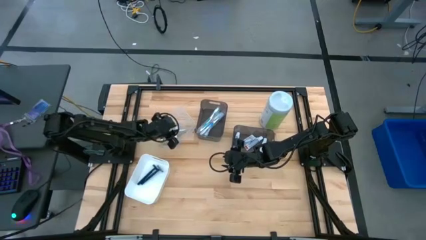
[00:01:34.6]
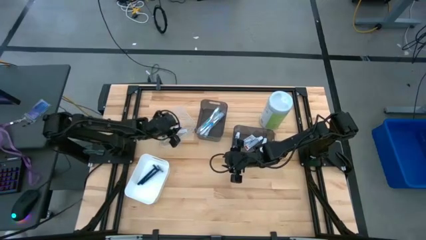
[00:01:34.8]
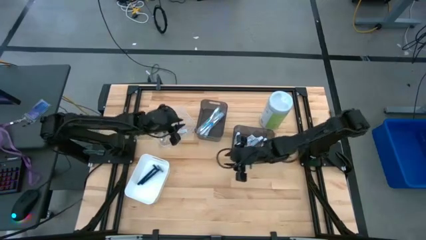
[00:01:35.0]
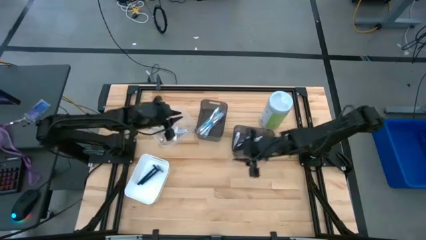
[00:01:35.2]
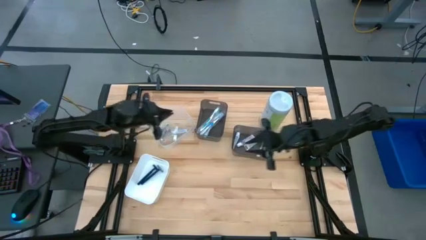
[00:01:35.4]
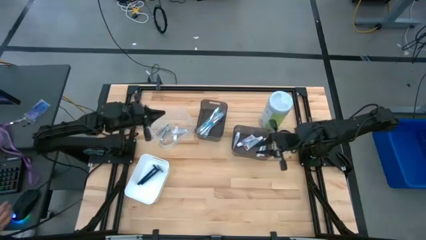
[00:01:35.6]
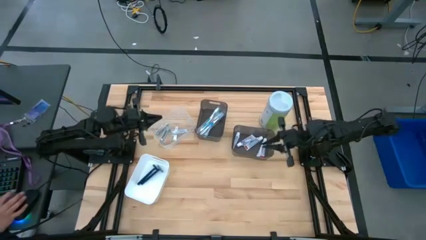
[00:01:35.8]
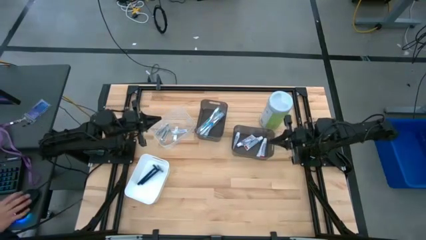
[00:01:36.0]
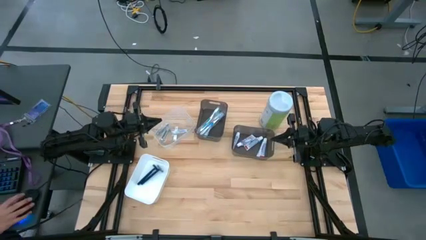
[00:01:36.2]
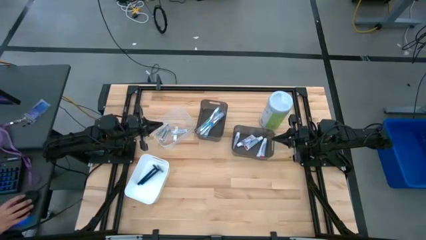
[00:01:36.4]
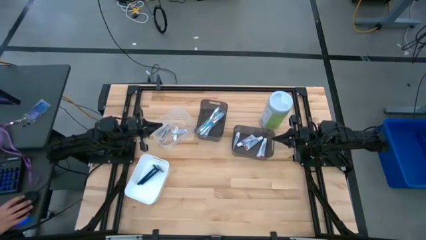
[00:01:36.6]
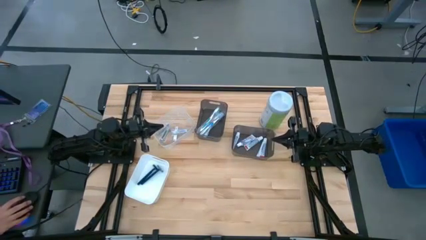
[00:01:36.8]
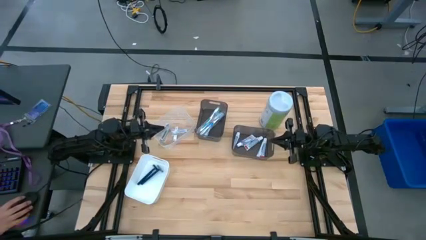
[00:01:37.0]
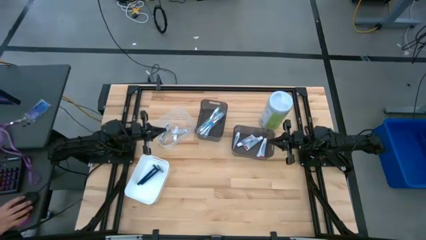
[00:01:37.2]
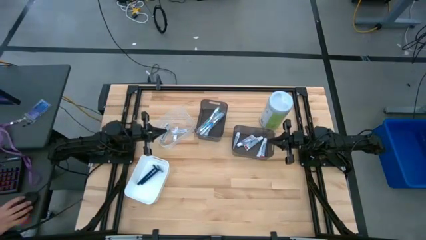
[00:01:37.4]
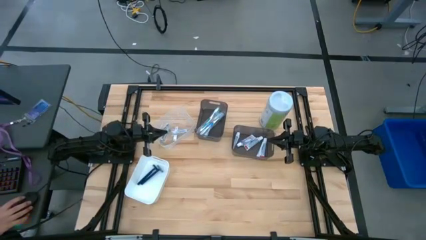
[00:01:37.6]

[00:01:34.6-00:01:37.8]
Task: Pick & Place Travel size toiletries
Return to Home Position
